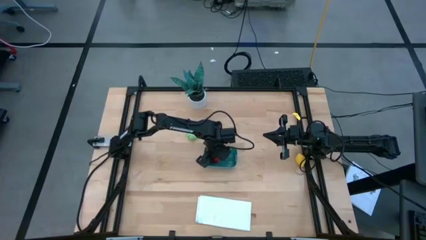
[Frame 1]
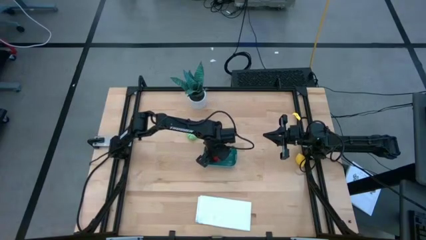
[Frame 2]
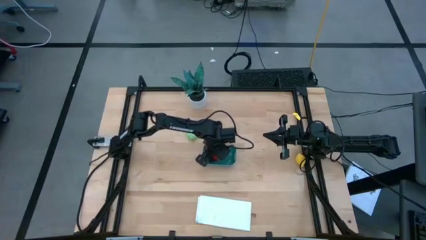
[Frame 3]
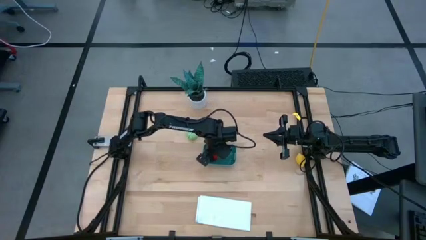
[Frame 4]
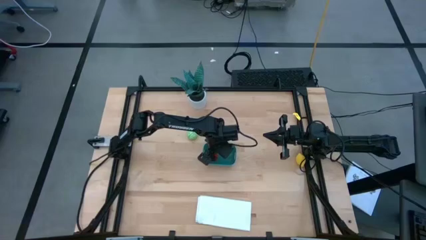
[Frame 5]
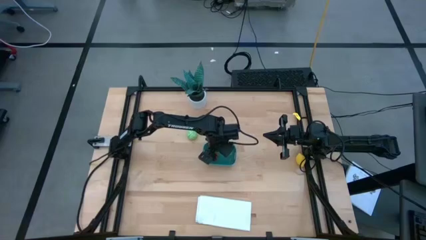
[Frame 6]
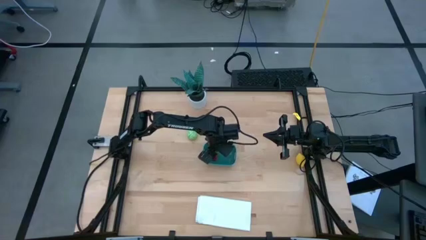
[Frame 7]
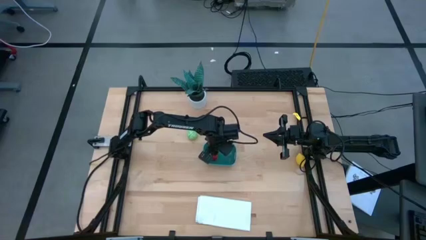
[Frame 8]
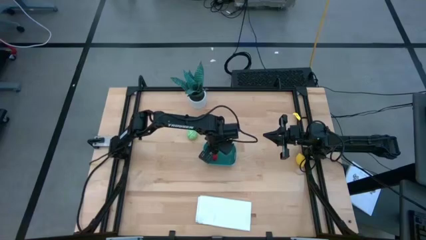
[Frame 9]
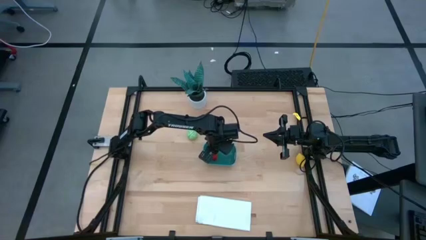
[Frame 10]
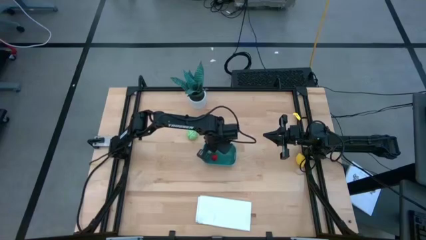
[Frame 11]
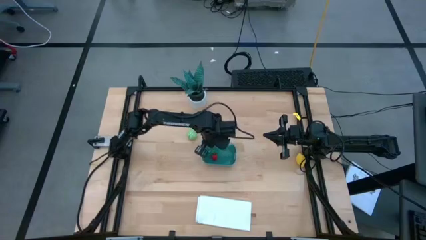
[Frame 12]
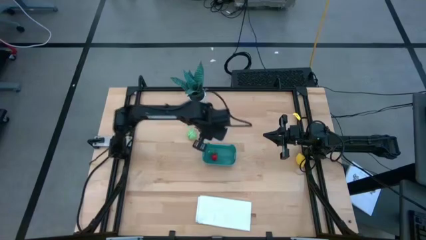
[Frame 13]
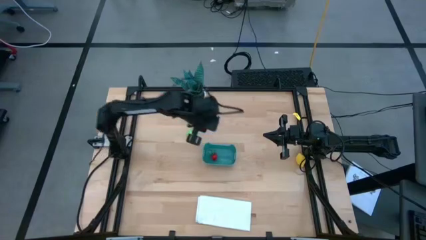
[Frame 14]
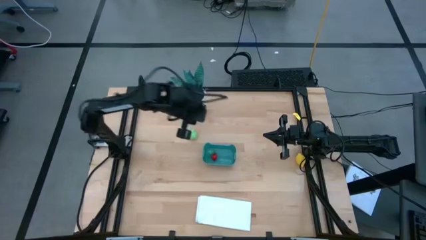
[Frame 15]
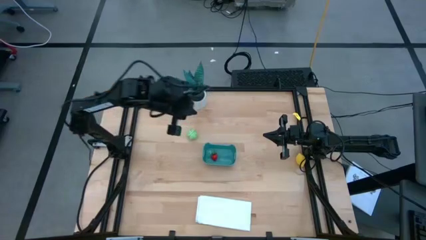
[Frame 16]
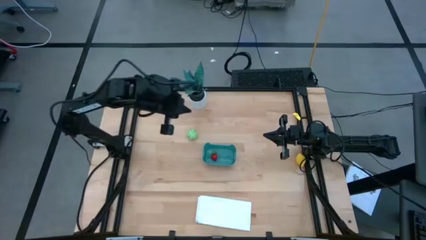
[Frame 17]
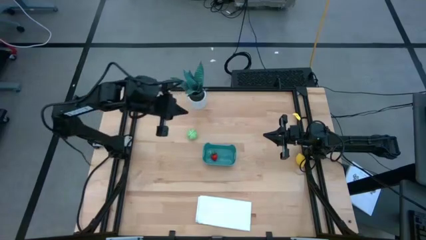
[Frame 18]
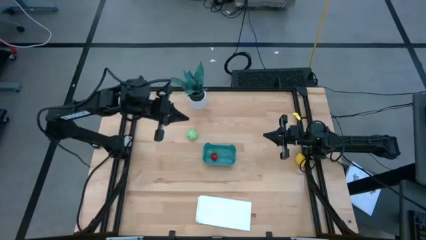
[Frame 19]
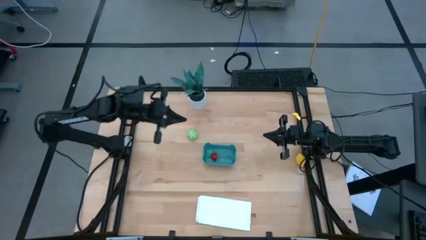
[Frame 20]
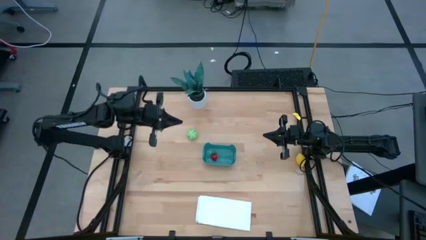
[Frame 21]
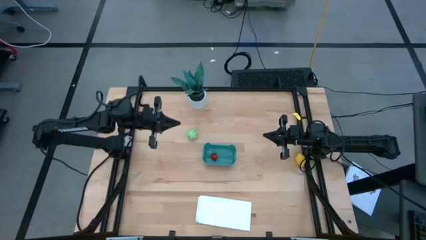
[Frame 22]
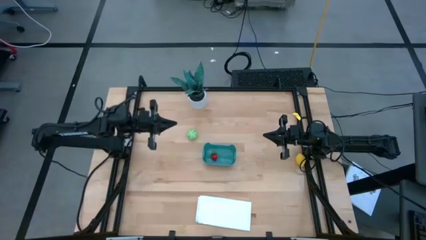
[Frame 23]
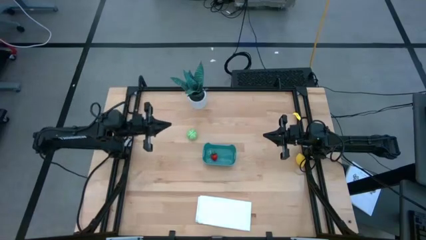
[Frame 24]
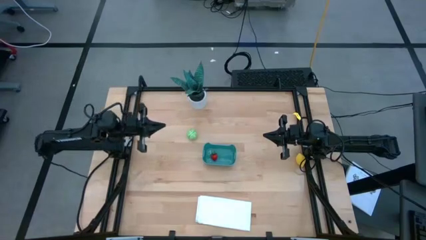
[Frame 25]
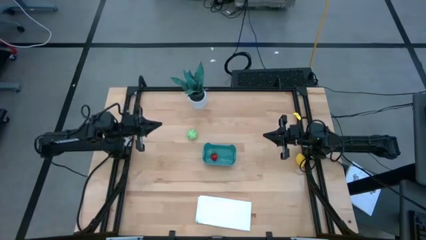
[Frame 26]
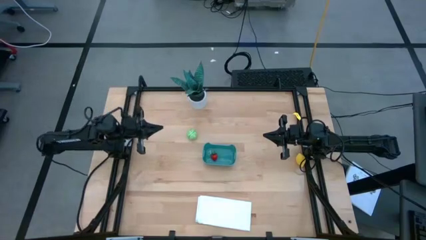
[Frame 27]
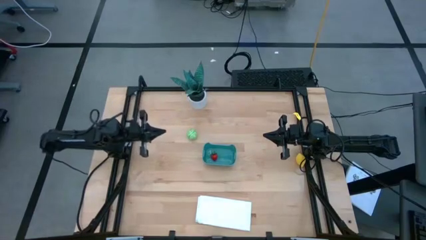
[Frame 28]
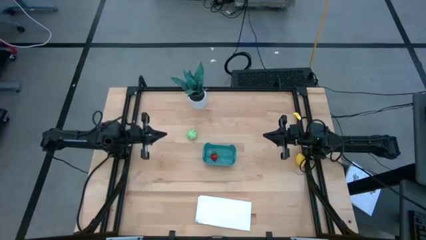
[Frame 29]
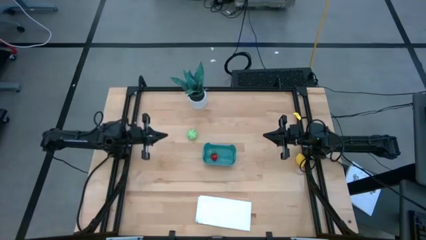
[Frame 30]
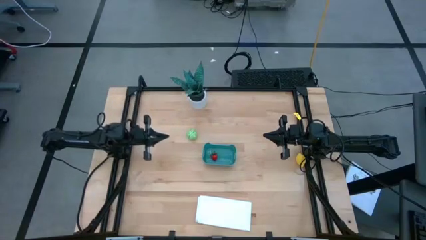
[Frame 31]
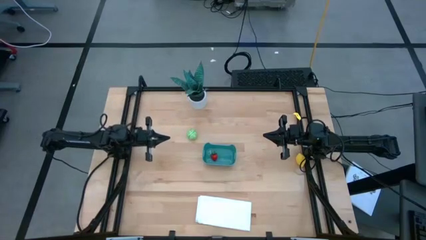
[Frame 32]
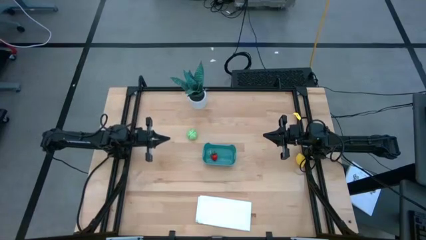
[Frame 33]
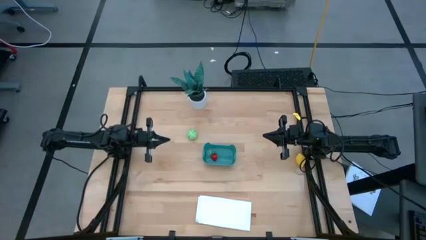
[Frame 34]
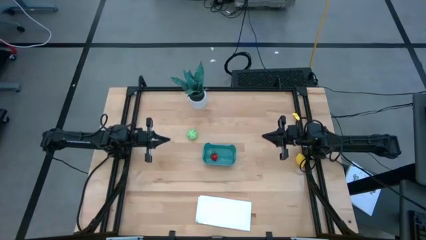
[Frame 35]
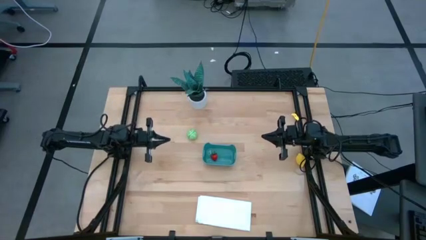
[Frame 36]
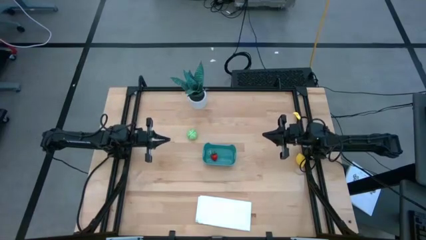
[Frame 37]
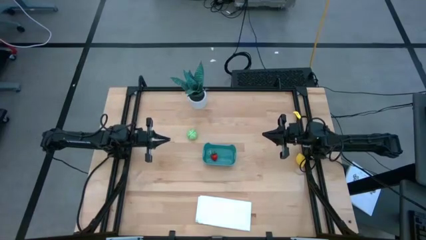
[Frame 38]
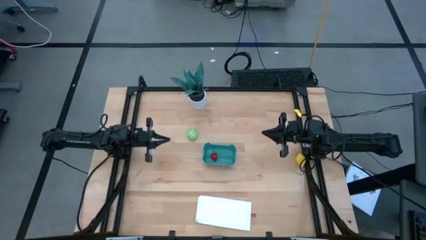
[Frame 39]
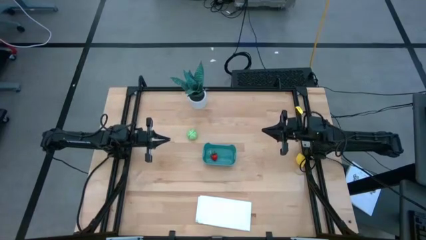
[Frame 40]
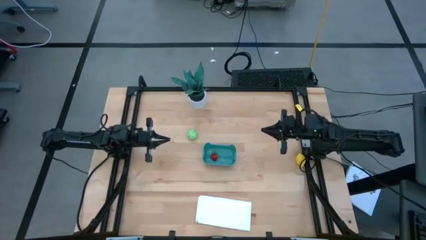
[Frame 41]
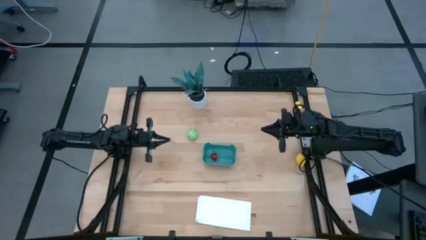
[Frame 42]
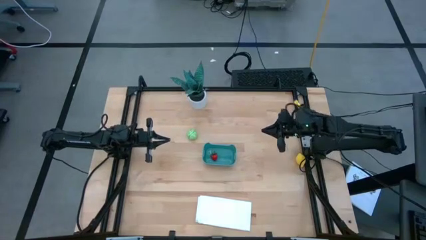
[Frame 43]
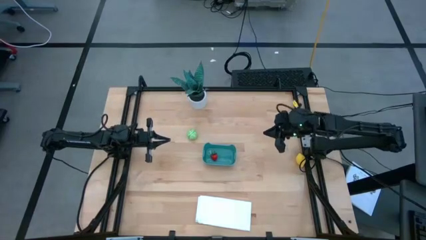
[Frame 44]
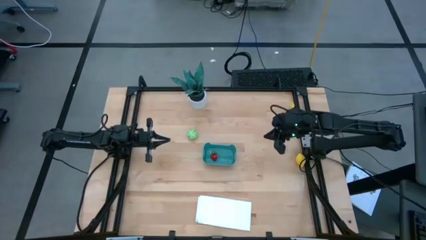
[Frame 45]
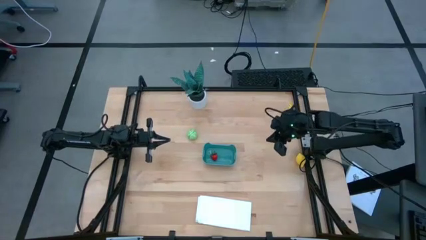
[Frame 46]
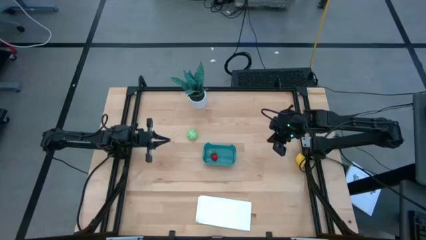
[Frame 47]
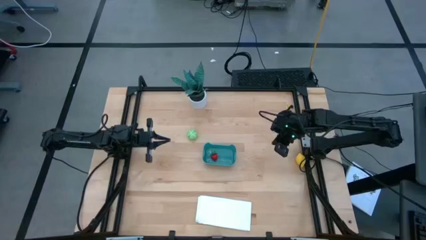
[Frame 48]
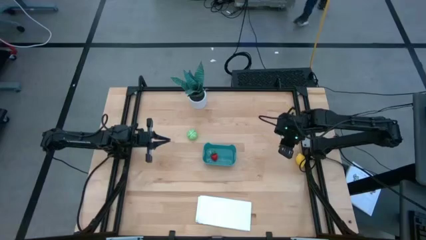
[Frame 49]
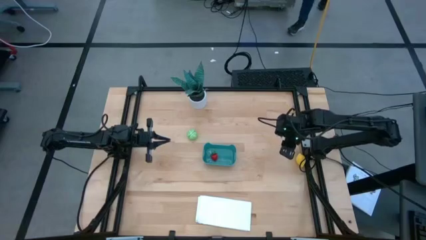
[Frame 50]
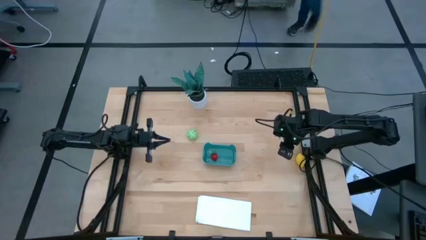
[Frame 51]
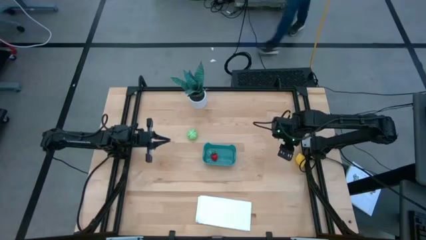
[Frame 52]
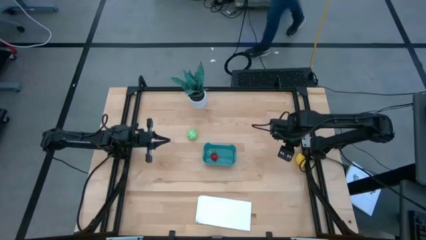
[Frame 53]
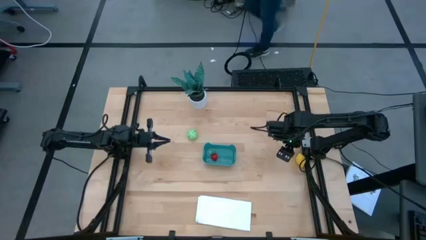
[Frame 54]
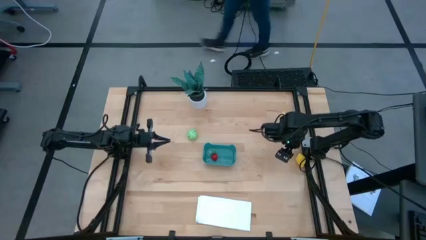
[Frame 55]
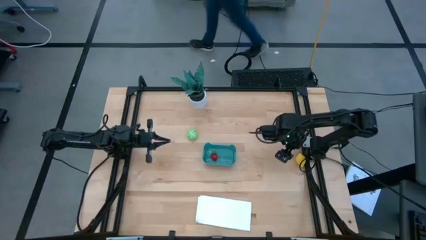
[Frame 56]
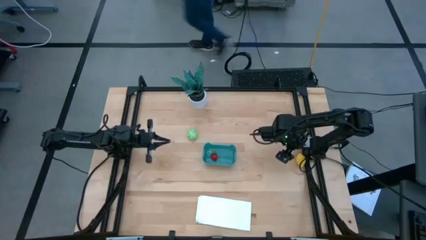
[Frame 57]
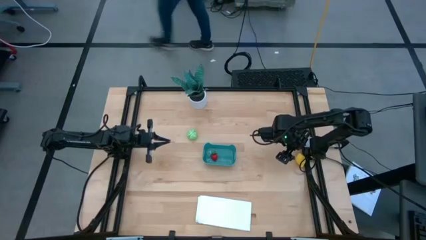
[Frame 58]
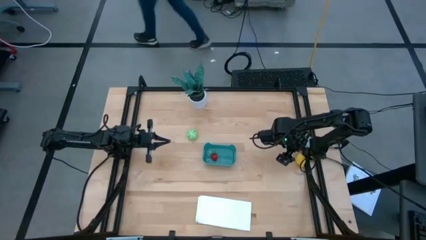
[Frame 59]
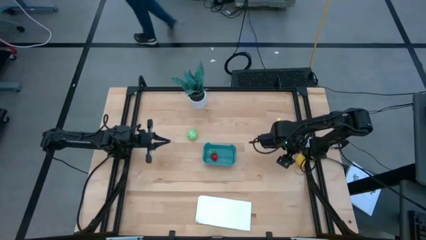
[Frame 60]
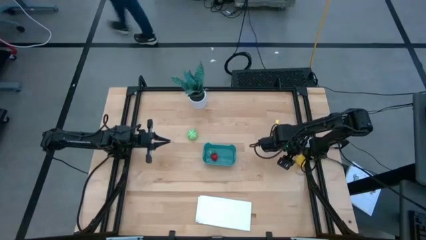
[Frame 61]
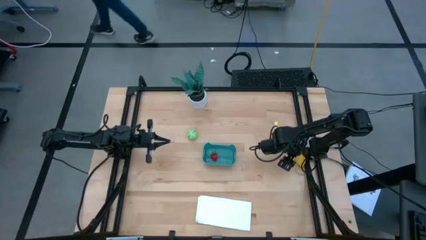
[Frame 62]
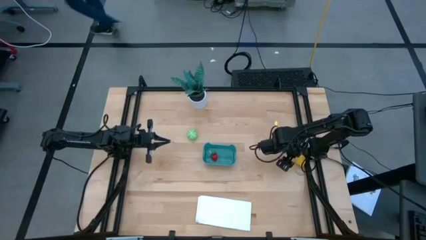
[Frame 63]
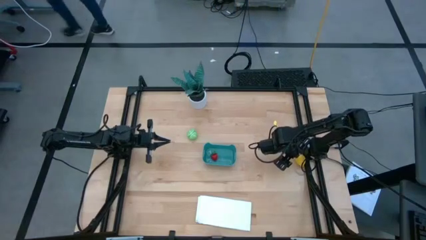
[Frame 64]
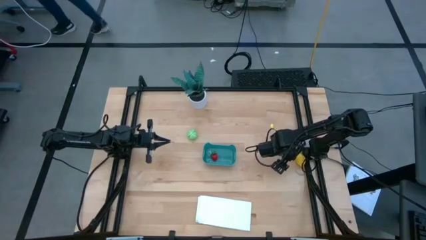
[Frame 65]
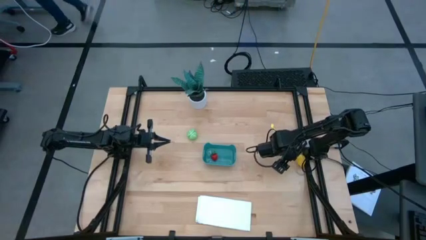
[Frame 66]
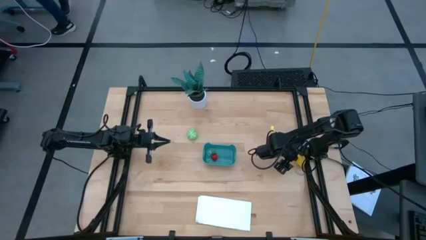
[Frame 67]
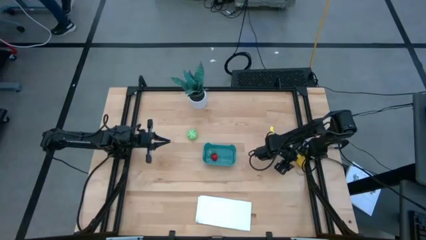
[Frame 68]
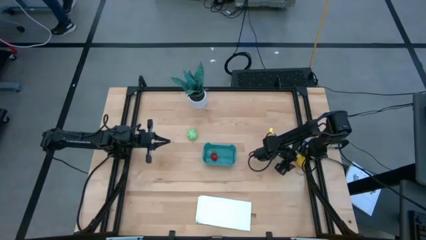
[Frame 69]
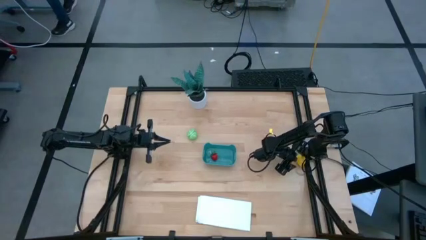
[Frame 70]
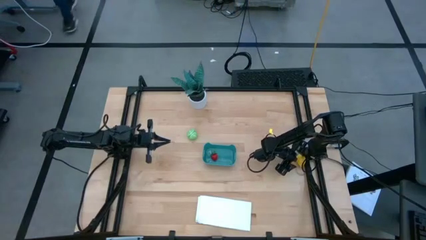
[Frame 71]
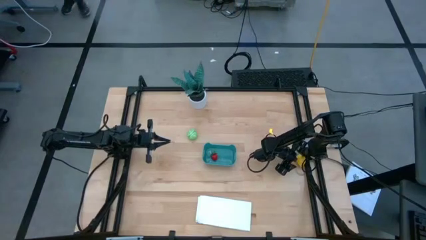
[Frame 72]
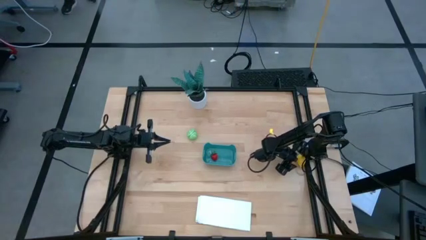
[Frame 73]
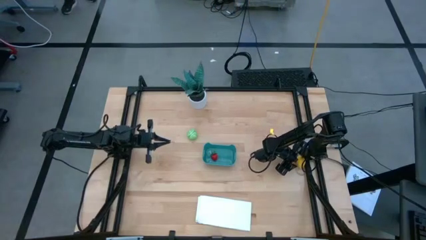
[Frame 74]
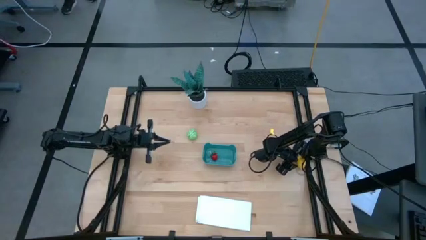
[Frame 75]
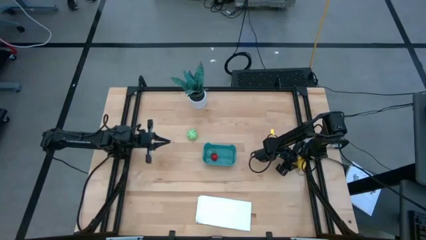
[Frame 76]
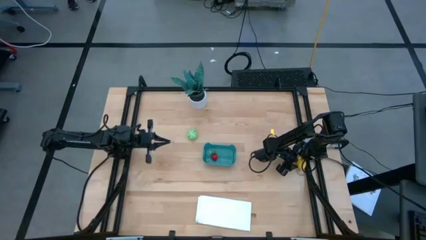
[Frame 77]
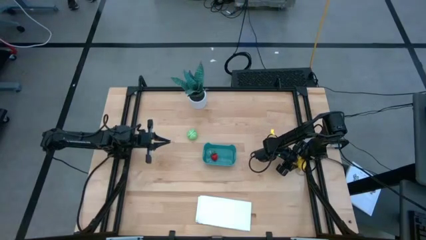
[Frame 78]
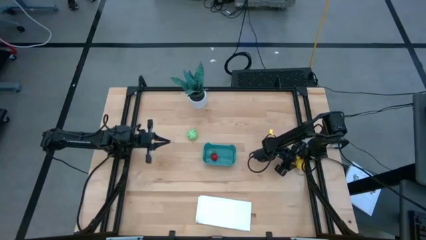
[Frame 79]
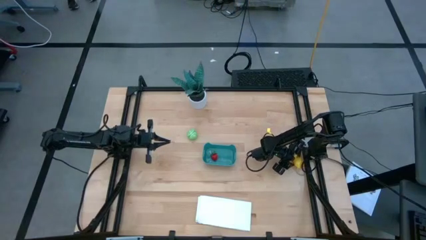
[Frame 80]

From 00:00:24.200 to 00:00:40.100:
Task: Pick and placing Produce into tupperware
Put the yellow lemon into the blue container
